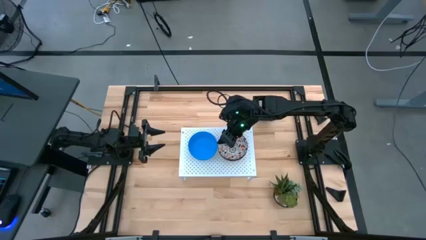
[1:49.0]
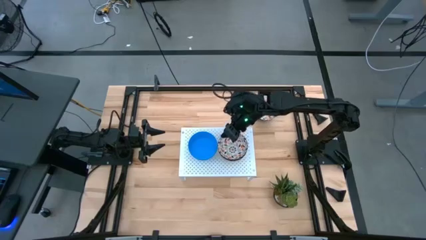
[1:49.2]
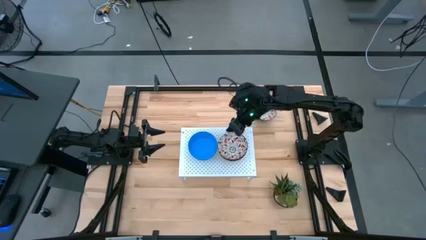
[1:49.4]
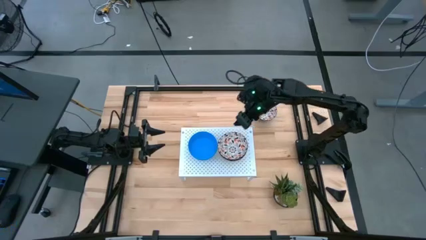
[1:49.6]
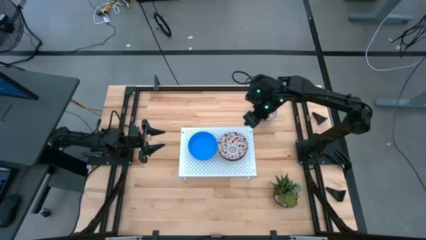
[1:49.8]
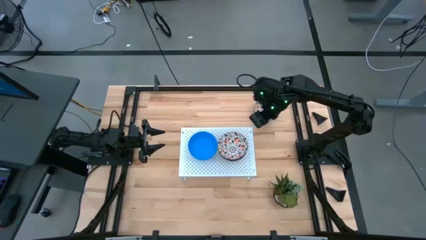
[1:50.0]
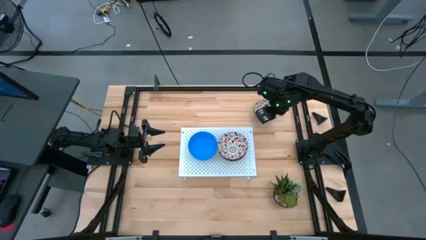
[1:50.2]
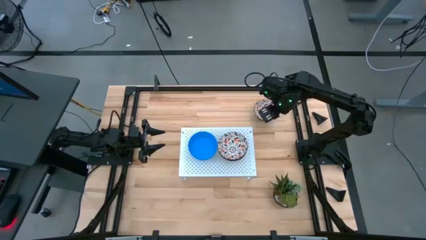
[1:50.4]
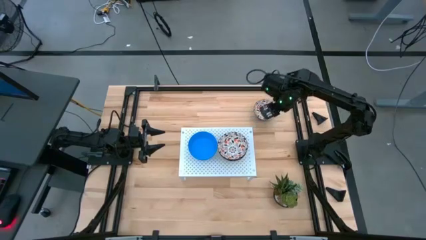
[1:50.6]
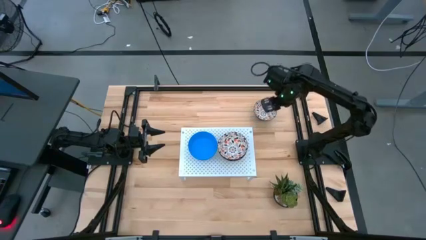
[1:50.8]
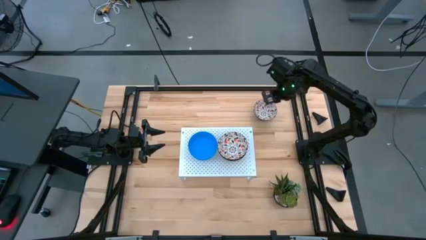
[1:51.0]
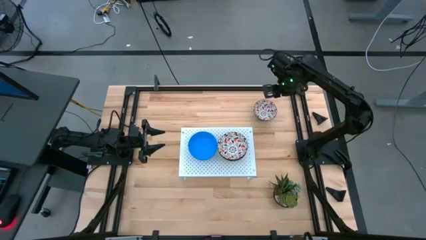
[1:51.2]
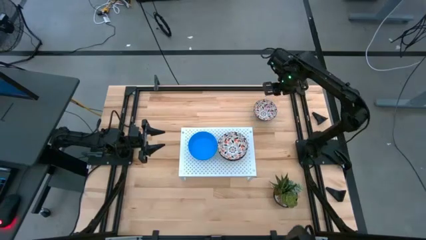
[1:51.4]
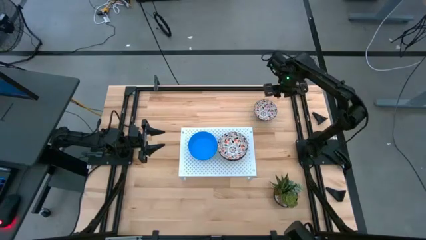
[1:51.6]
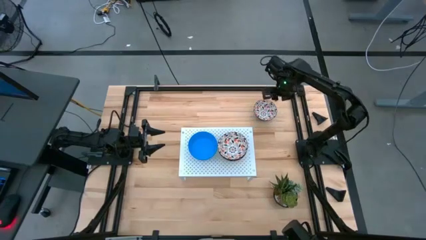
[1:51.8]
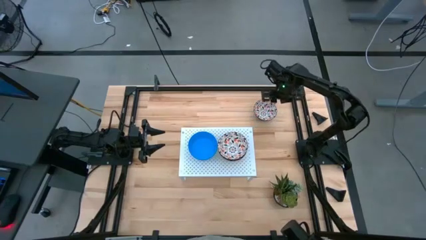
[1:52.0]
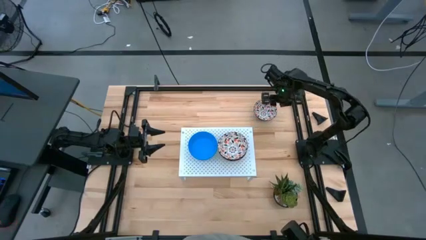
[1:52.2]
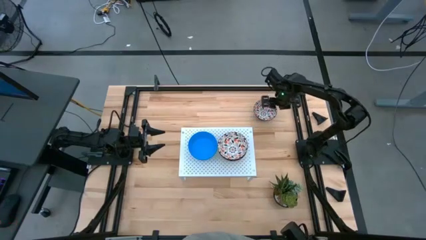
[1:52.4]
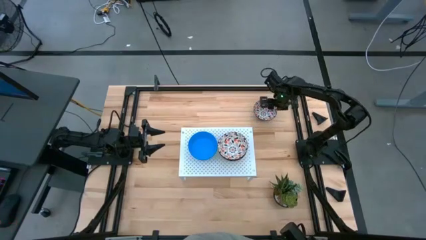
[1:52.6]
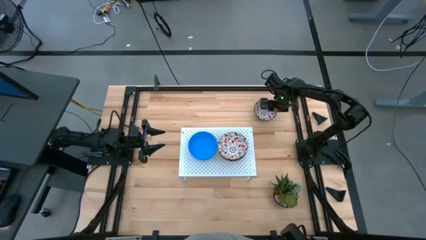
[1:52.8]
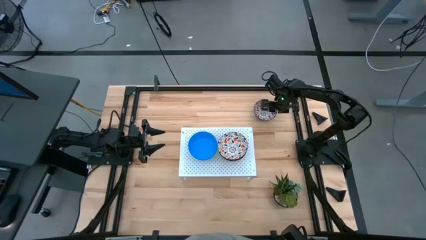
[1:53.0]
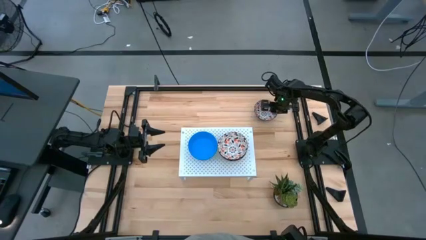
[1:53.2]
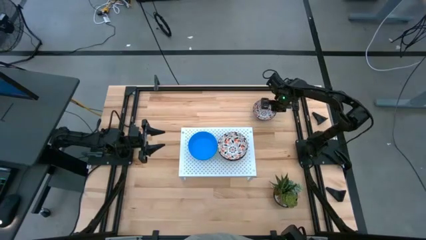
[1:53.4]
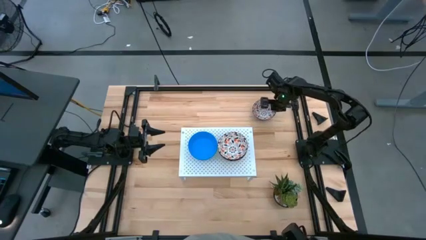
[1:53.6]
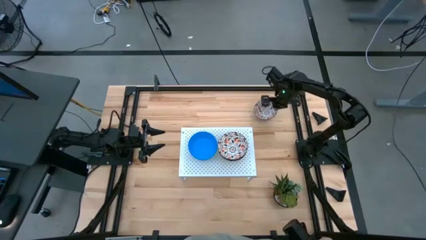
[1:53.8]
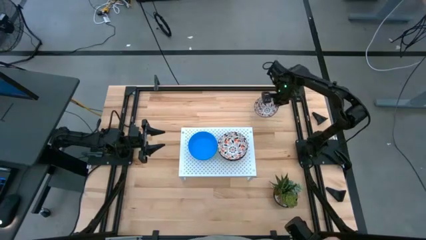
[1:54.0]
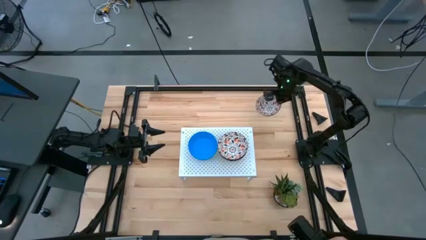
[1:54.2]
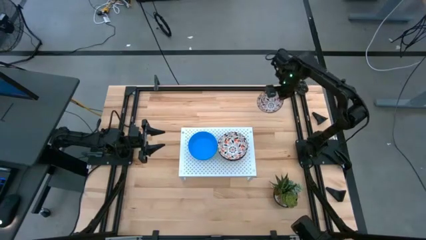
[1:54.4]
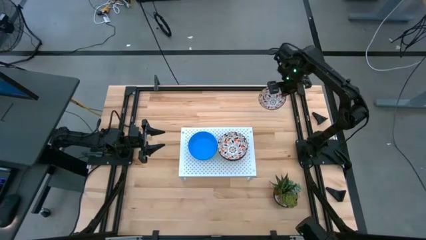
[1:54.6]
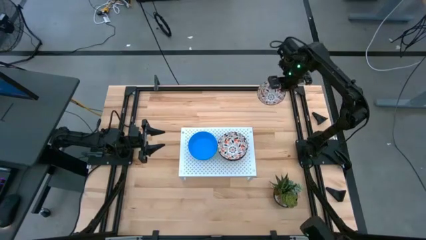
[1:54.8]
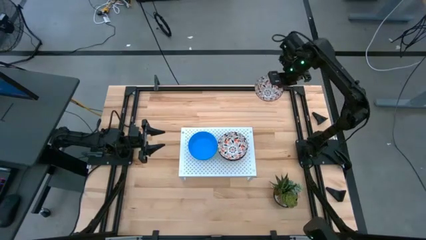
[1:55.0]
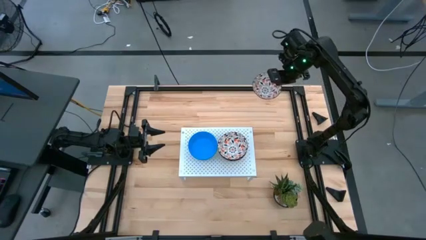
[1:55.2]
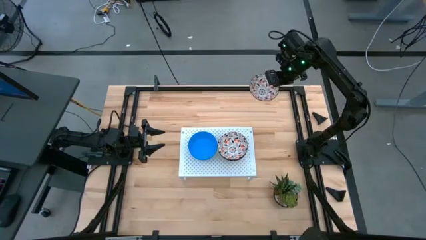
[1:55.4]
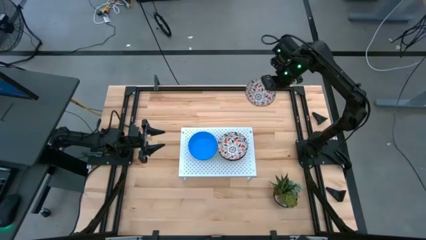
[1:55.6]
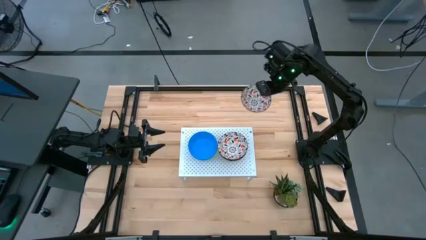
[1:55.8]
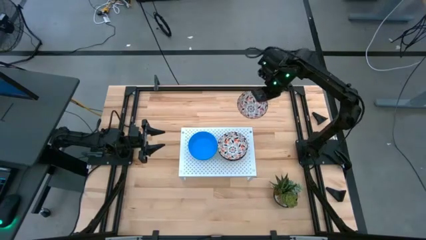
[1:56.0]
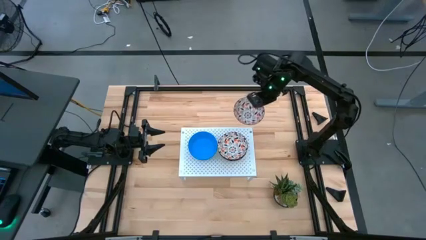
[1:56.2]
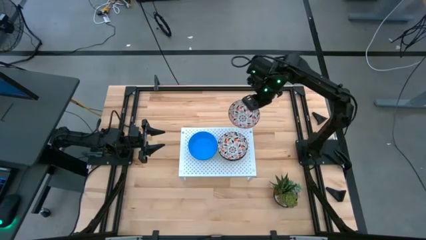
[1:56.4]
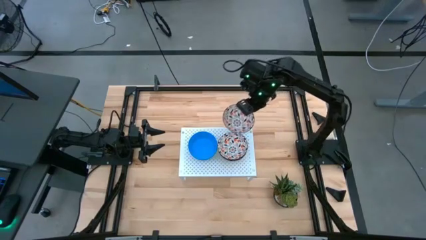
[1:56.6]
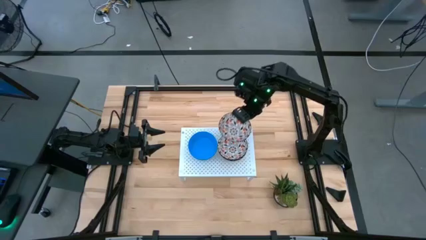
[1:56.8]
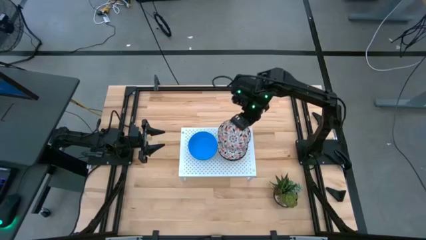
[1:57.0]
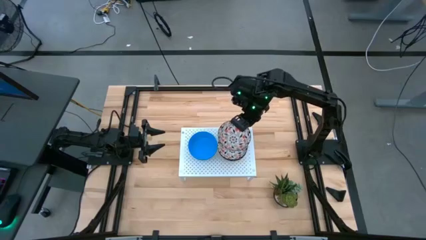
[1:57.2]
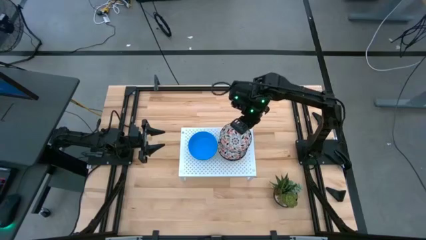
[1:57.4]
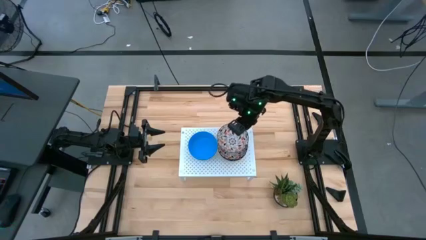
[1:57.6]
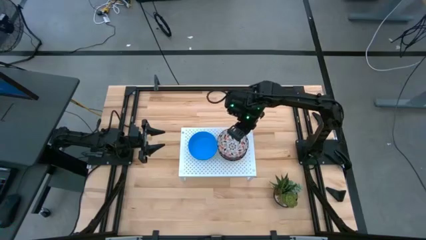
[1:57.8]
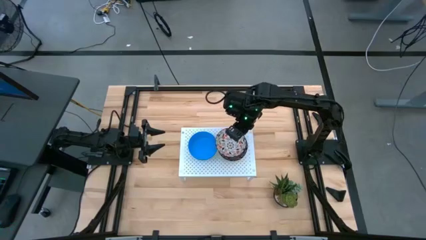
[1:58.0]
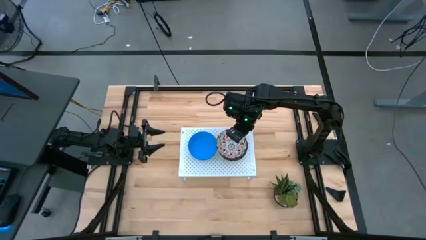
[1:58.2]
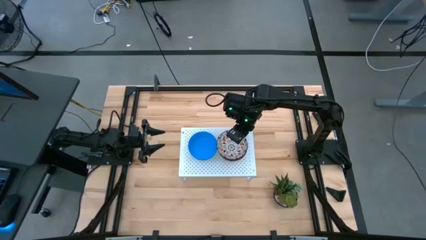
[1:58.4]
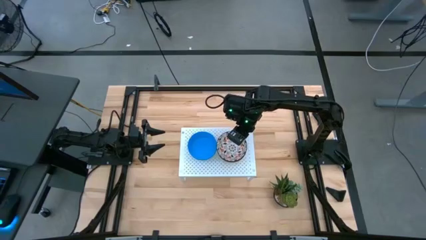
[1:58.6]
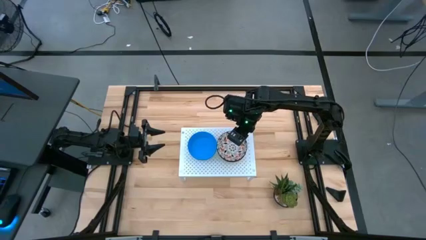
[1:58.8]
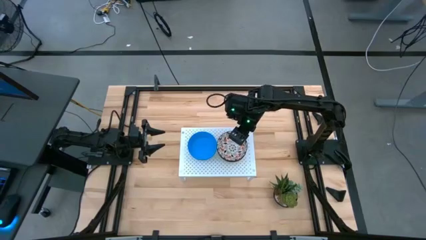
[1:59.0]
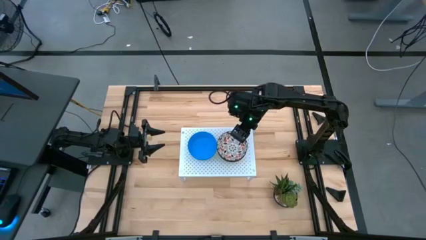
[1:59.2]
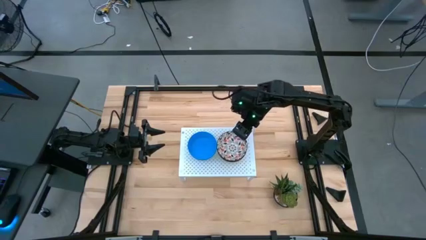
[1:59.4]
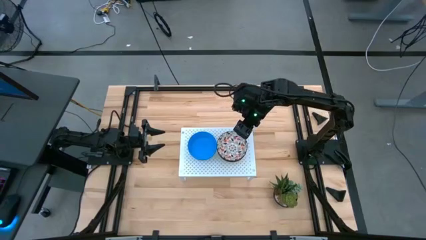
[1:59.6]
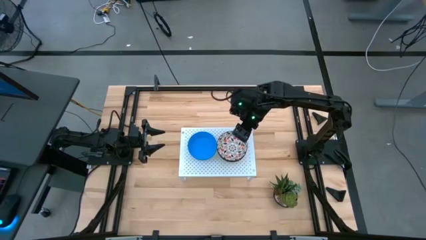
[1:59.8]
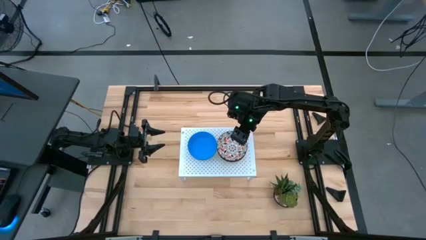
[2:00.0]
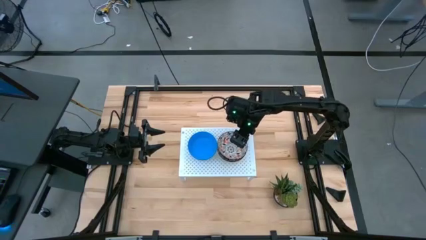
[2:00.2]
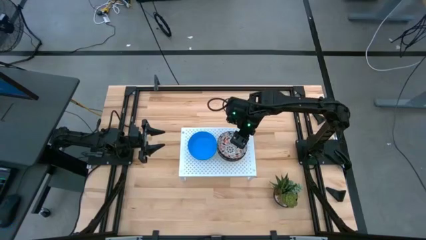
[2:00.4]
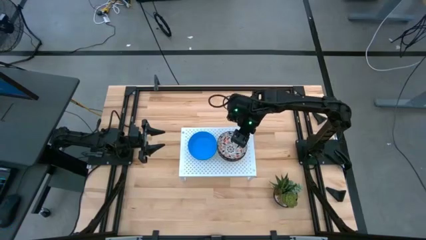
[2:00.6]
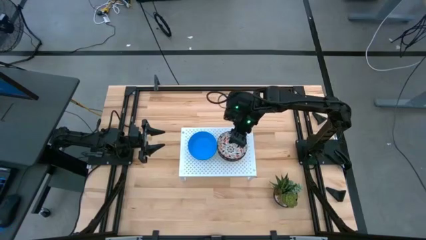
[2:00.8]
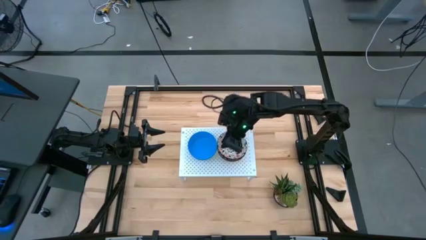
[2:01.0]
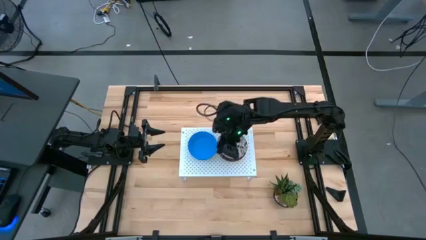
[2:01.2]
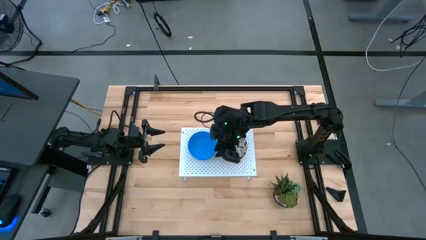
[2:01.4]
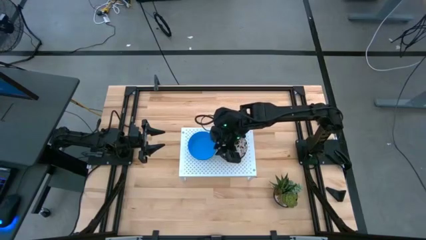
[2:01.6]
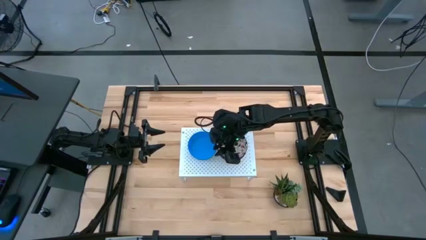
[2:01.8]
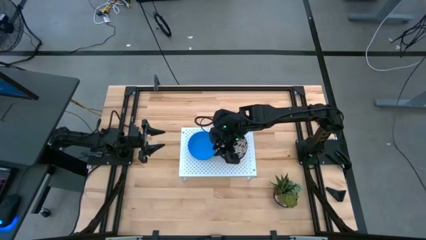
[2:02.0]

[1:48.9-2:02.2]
Task: Pick & Place Mini bowls
Stack the orange patterned bowl on top of the orange patterned bowl on the shelf

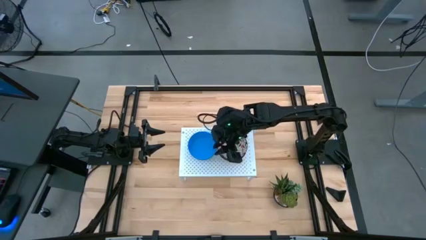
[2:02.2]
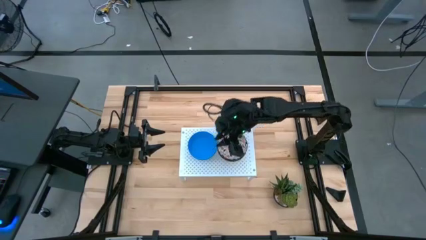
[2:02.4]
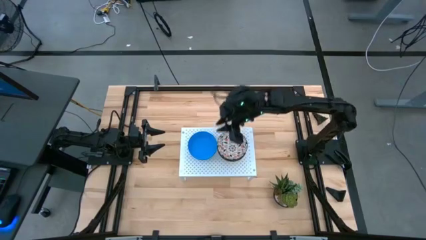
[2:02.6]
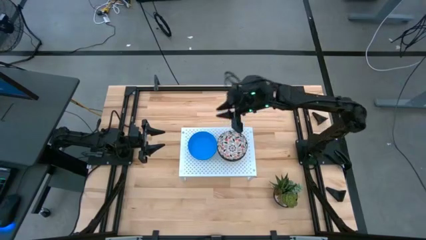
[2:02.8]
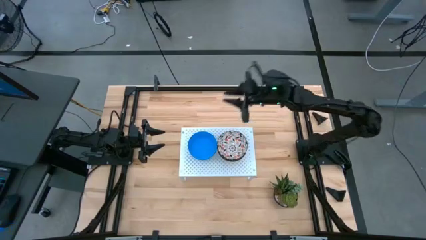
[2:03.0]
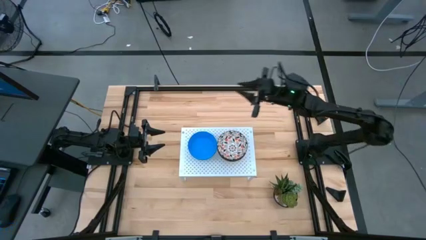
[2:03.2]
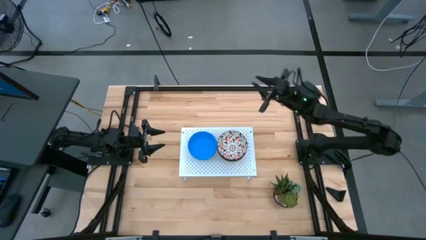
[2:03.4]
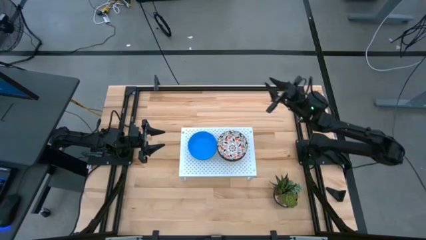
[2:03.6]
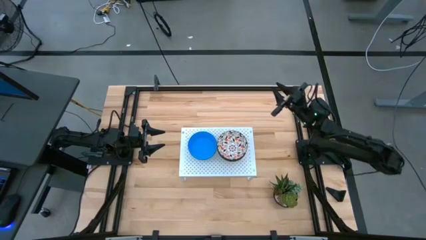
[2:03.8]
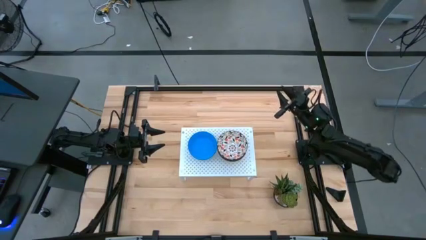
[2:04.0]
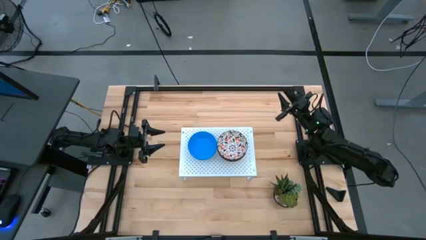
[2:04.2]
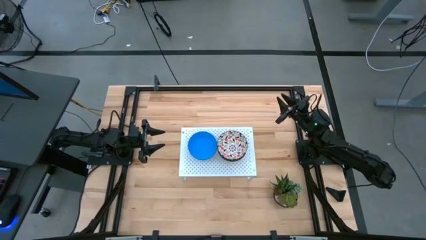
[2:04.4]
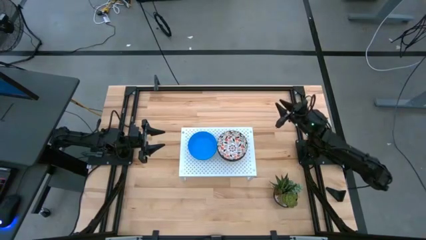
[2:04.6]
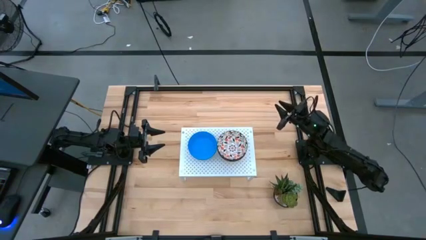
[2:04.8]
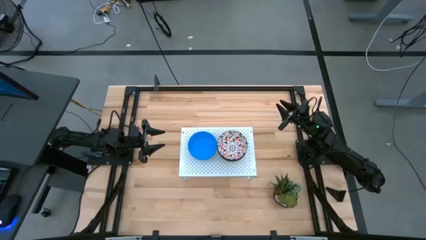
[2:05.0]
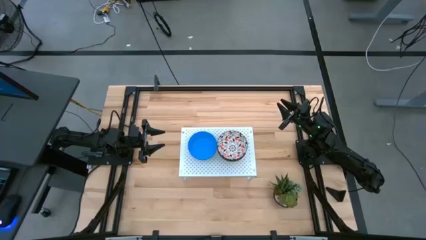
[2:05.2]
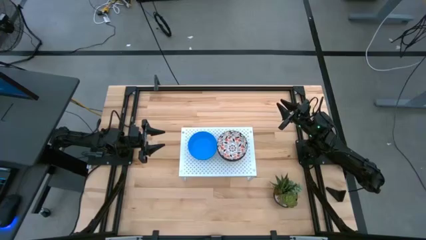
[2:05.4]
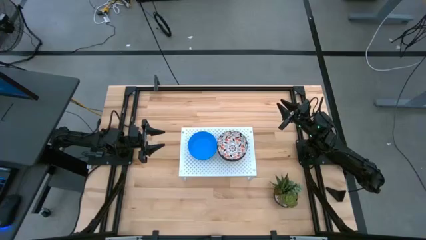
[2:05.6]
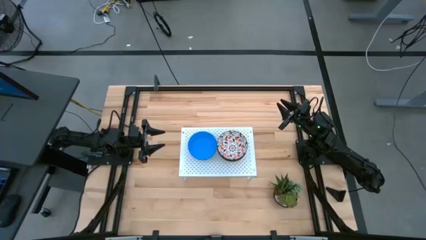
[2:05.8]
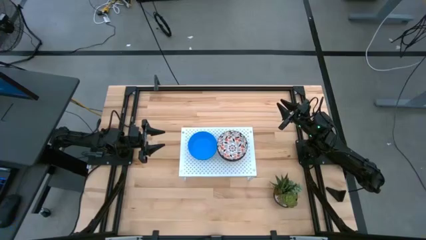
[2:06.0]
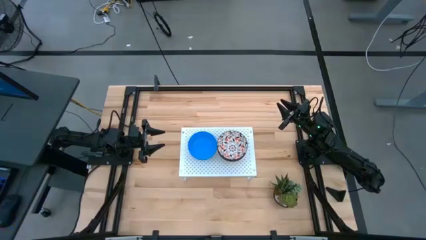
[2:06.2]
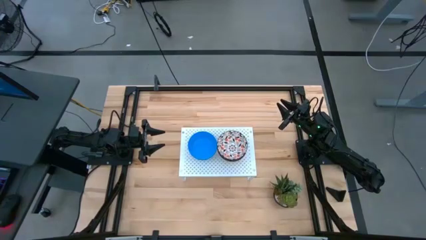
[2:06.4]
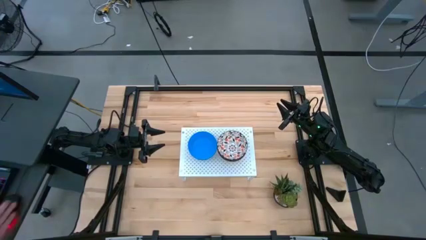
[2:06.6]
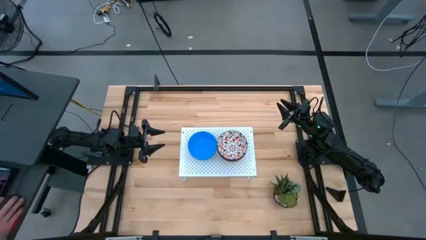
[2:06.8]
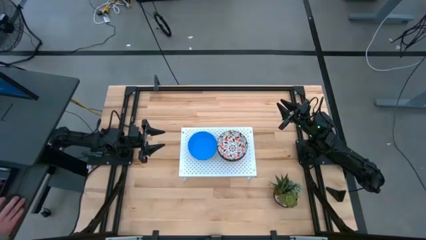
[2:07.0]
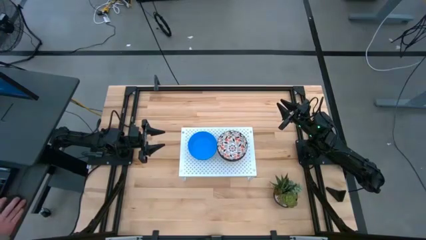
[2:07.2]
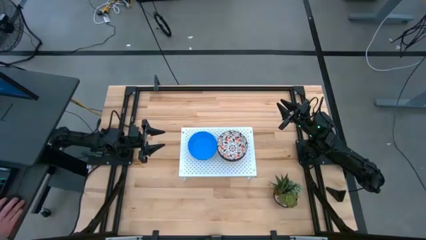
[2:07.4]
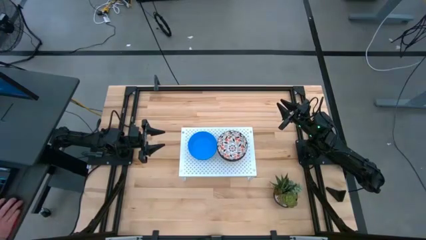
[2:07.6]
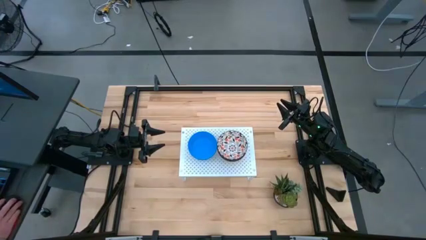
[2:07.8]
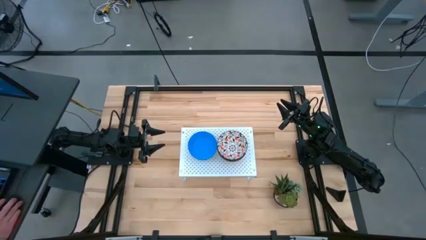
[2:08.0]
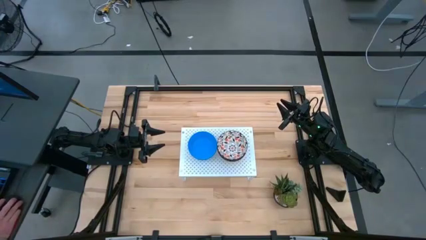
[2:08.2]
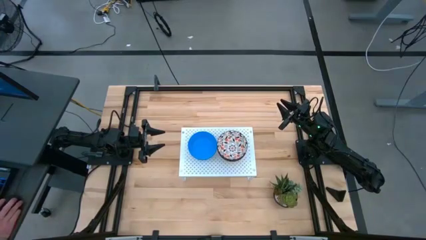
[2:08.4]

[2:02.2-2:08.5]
Return to Home Position
